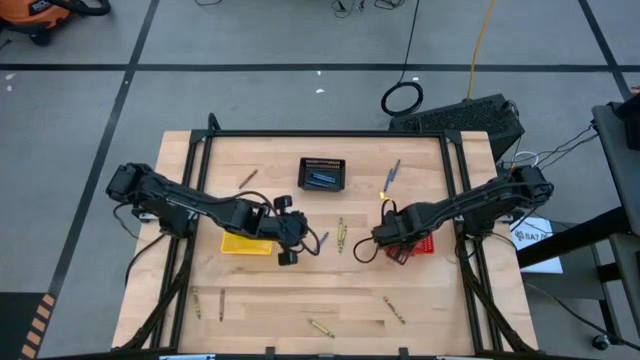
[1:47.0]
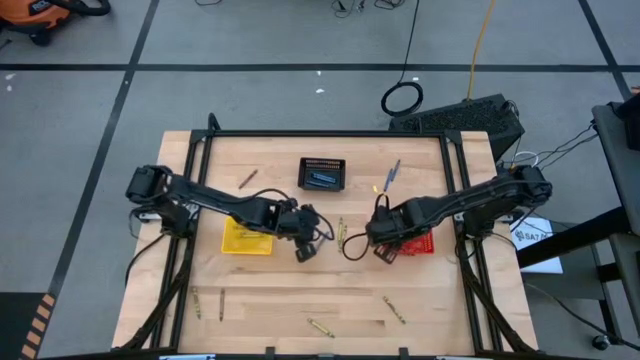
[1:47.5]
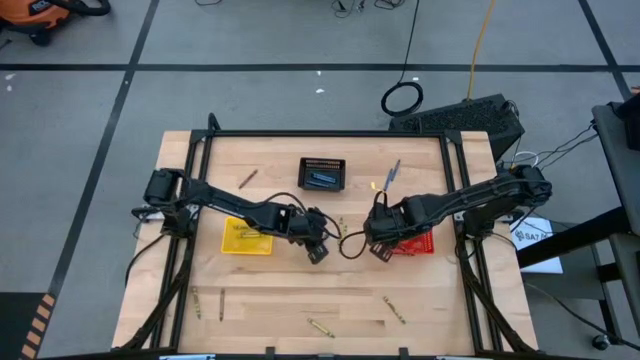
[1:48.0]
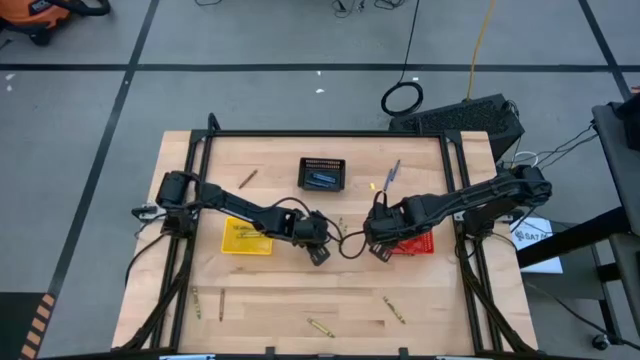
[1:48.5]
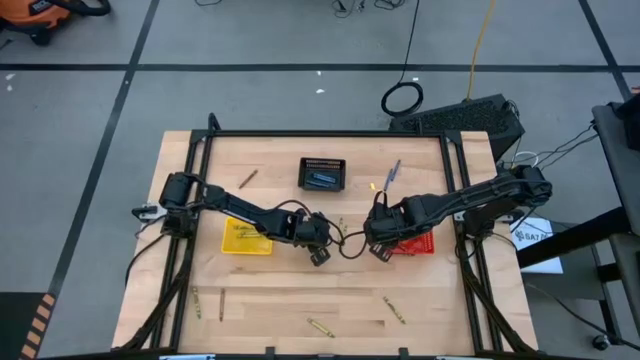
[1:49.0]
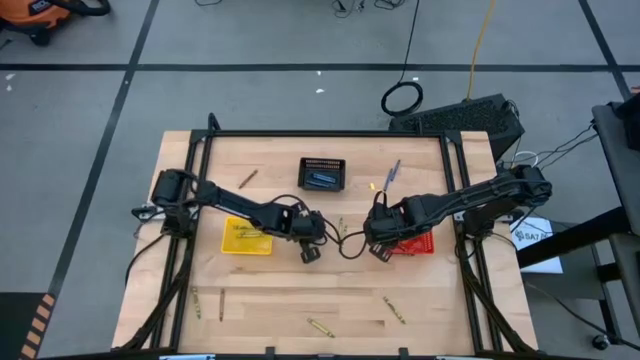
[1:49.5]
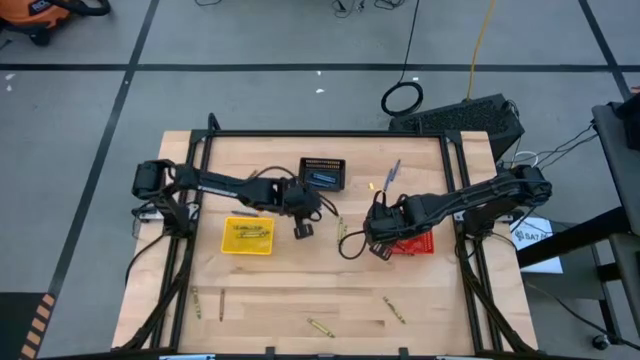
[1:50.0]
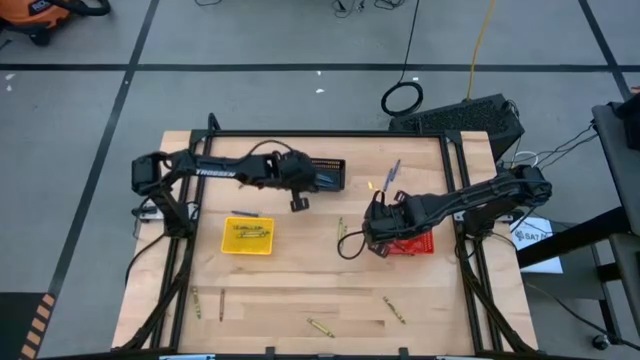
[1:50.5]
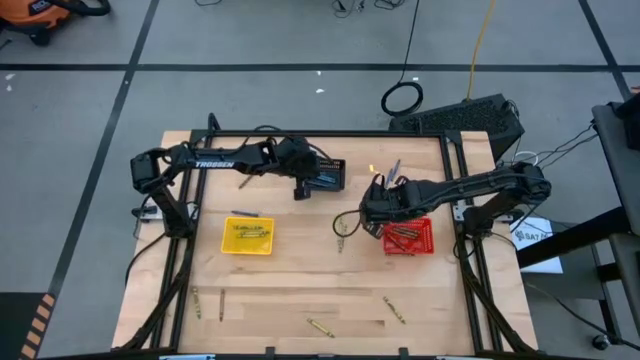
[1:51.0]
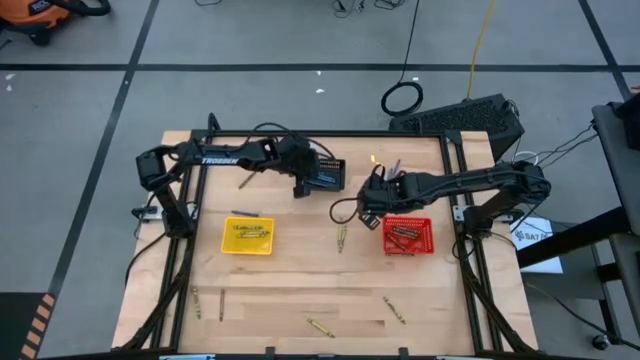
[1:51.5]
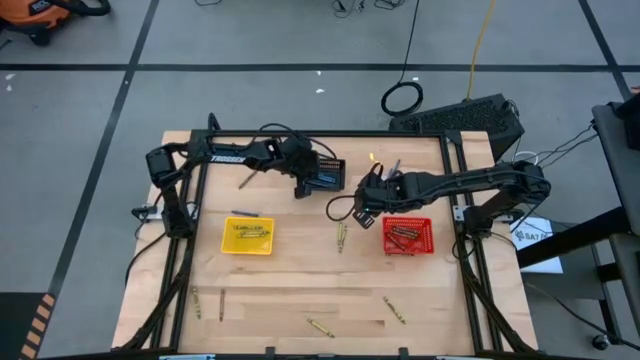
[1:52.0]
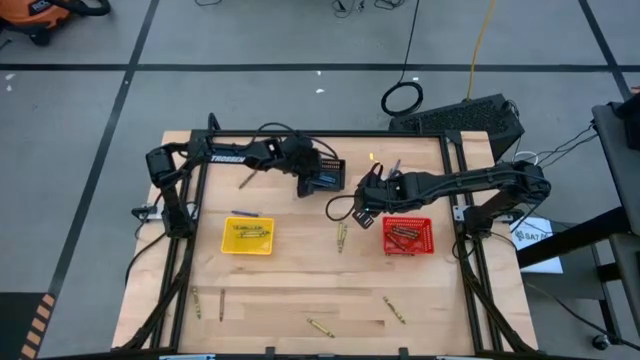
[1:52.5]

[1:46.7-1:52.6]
Task: Sort crayons
Put the blue crayon into the black bin

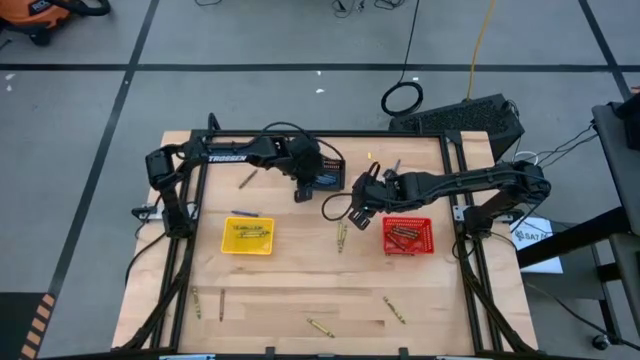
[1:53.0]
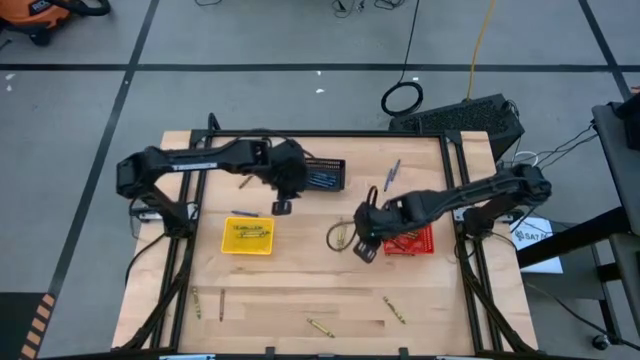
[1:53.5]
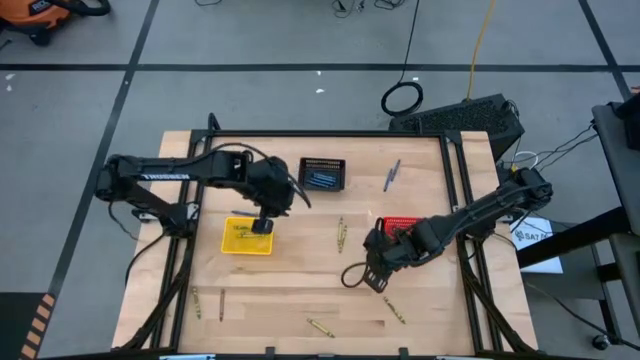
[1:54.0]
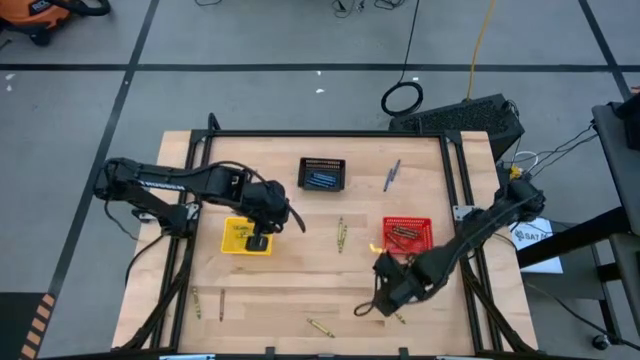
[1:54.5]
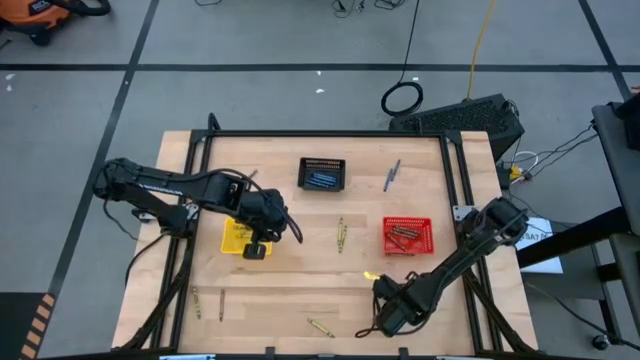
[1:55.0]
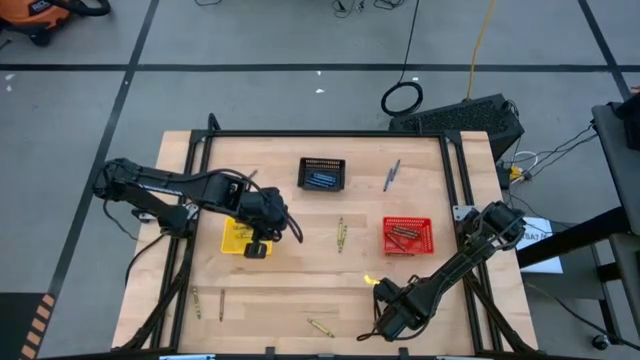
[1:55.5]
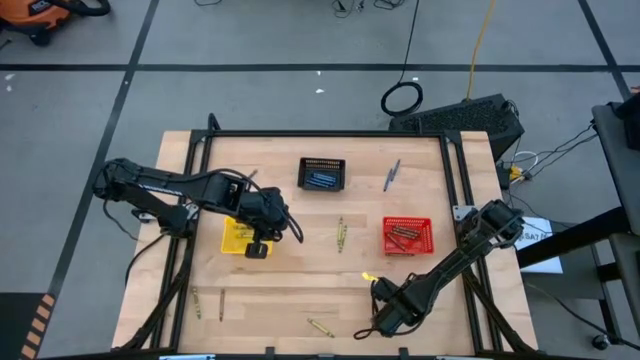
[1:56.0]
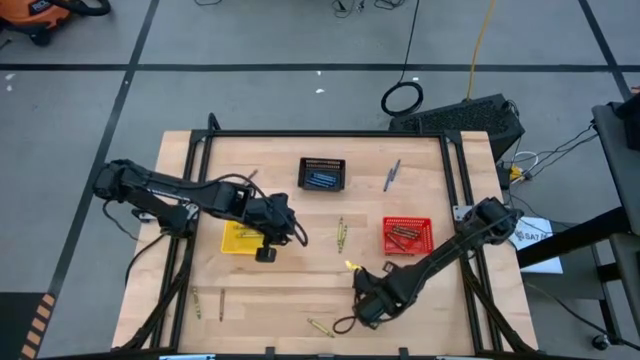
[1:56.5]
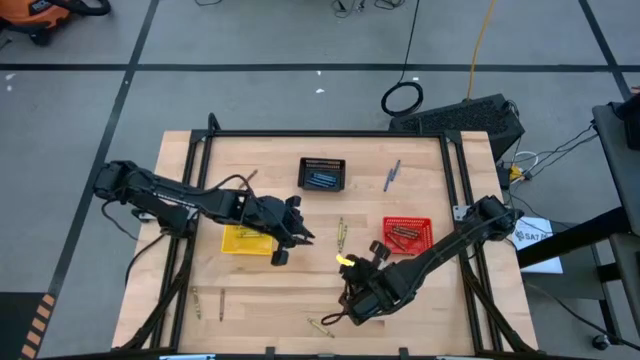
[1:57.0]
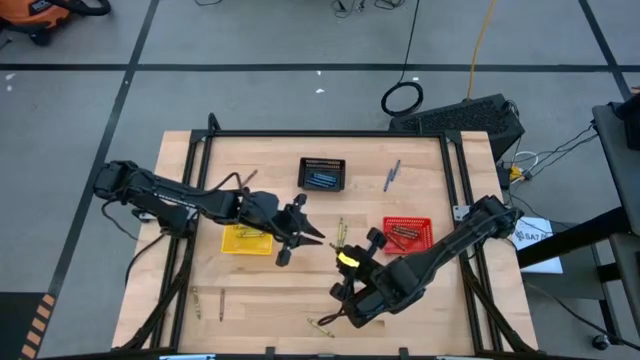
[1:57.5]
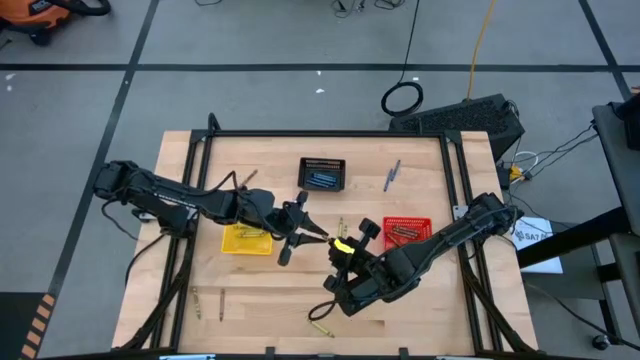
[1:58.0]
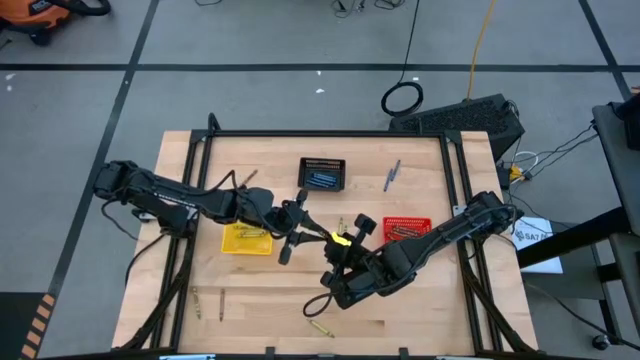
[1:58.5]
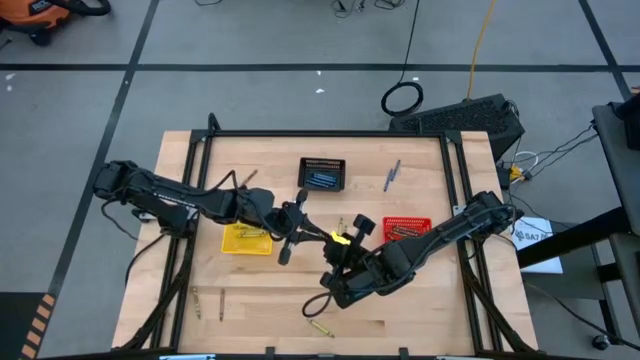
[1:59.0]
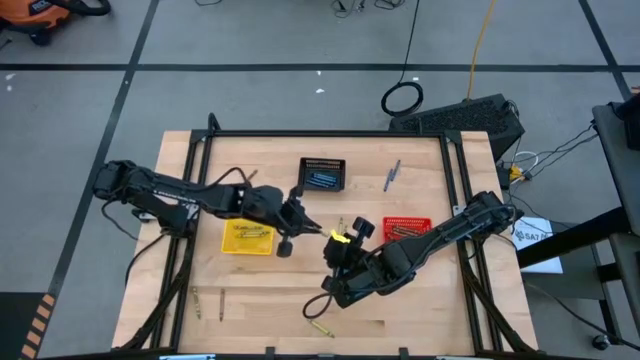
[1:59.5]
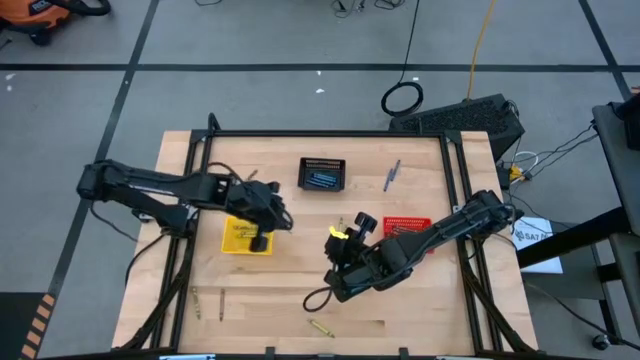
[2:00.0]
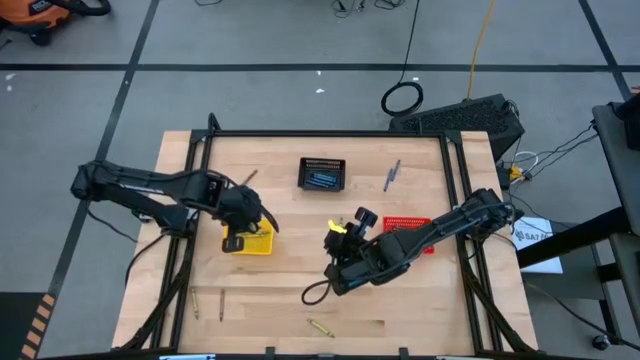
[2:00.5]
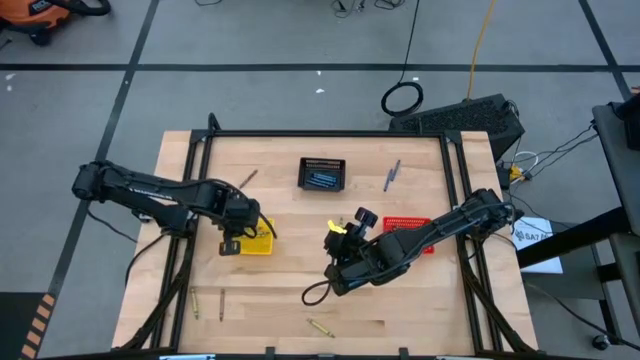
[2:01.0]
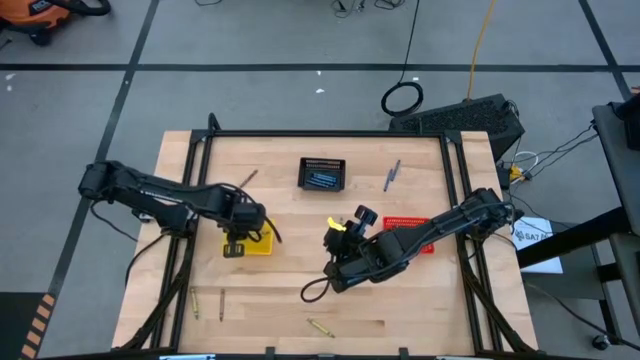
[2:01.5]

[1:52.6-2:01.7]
Put the green crayon into the yellow bin

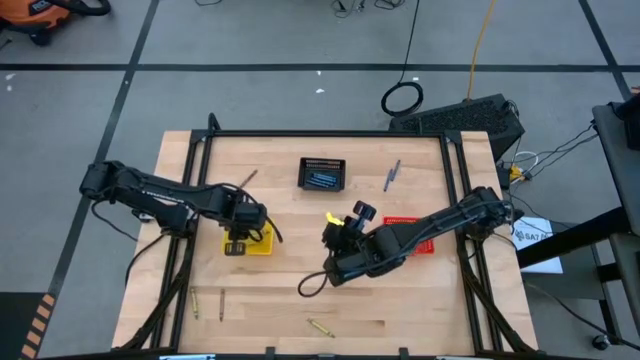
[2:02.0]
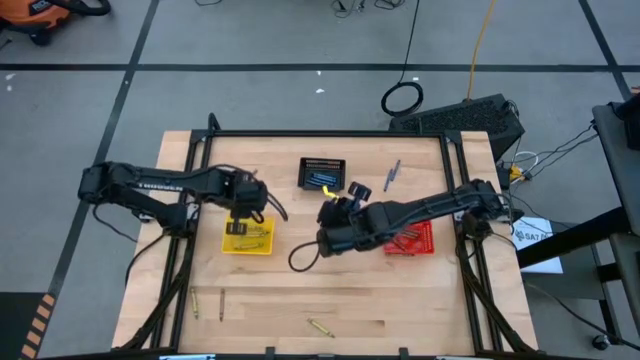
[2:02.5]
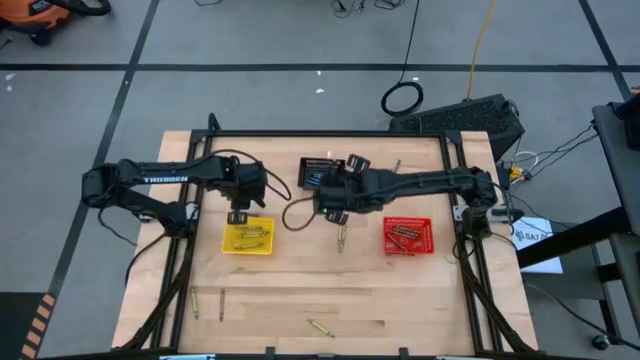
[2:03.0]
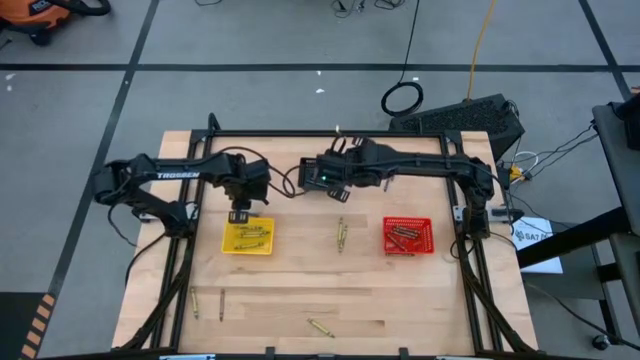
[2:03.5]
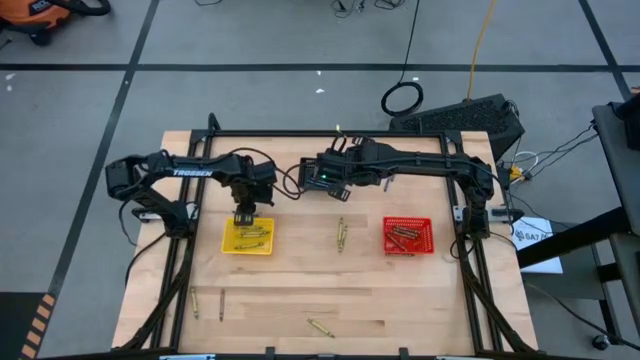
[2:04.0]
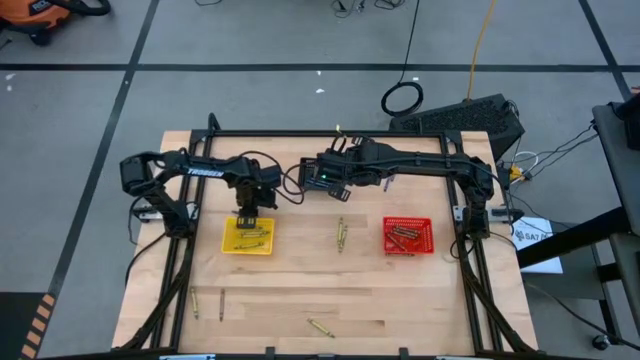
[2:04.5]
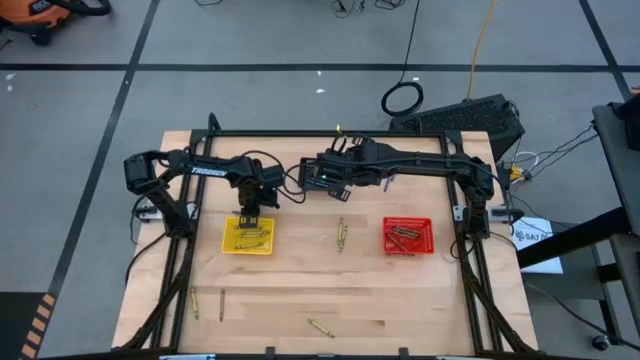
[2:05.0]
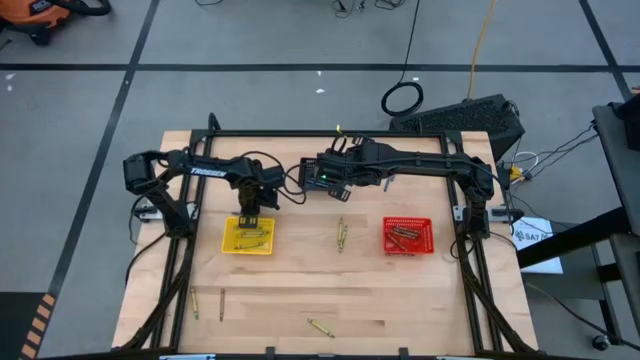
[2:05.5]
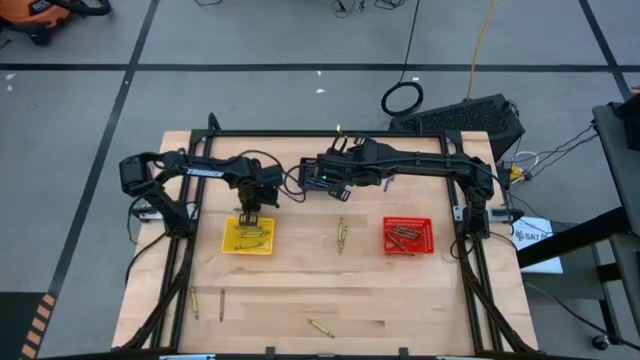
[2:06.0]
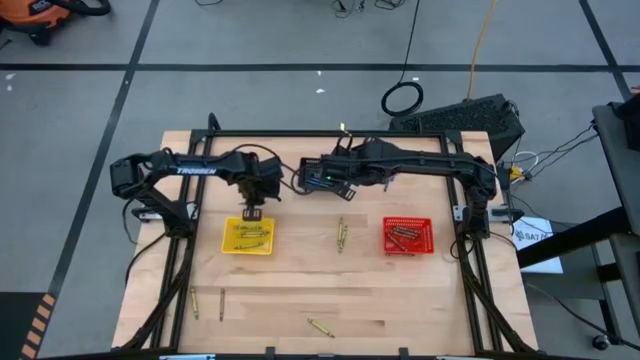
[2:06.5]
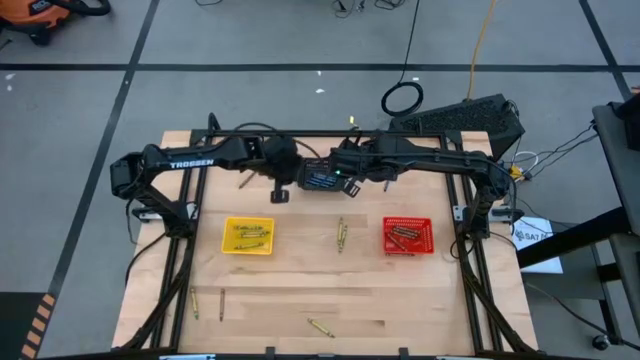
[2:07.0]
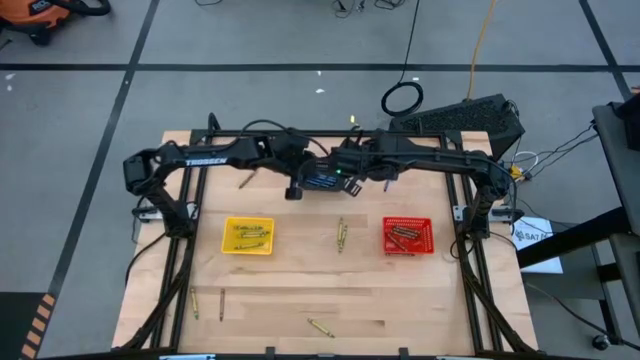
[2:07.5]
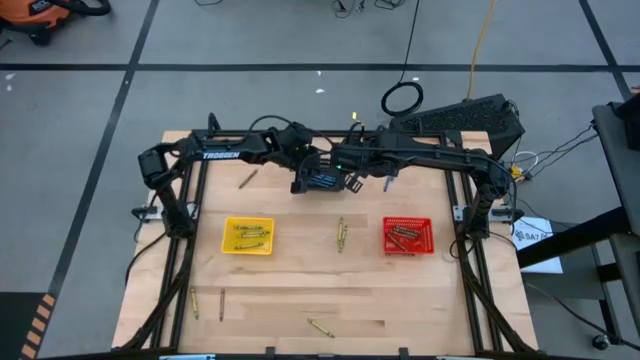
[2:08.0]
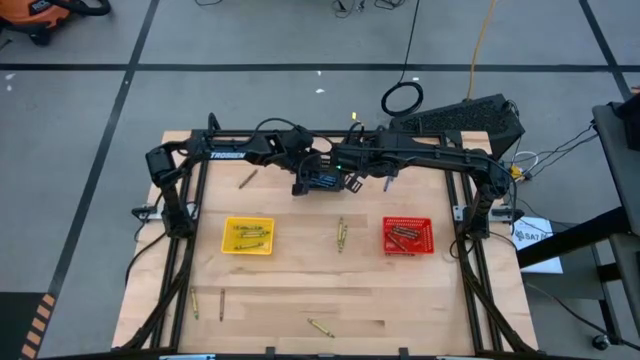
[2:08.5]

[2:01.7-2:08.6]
Put the blue crayon into the black bin
